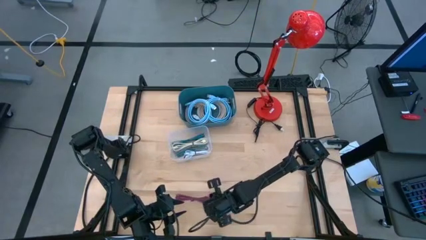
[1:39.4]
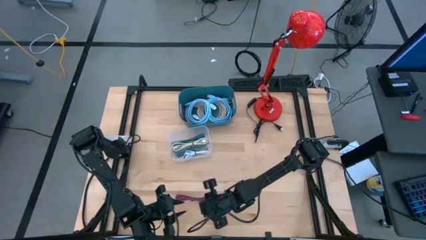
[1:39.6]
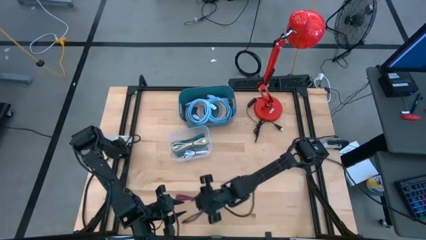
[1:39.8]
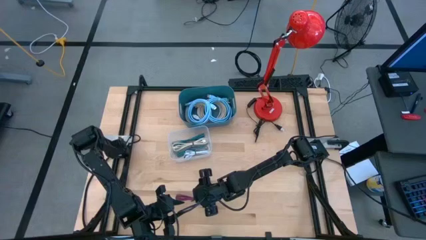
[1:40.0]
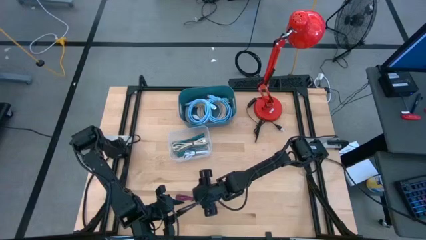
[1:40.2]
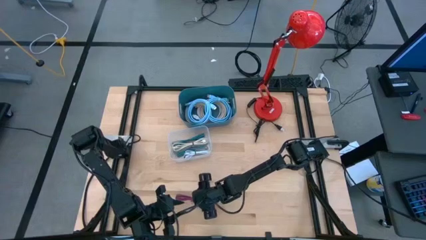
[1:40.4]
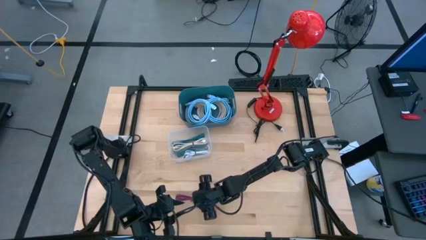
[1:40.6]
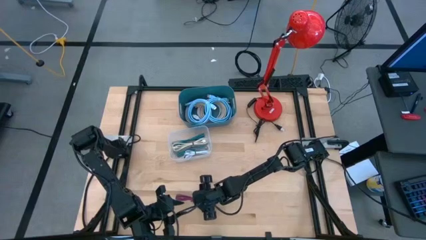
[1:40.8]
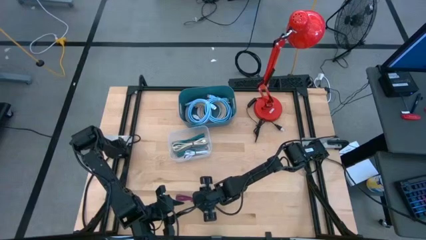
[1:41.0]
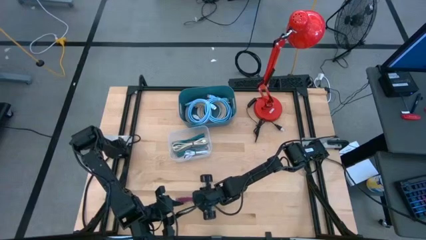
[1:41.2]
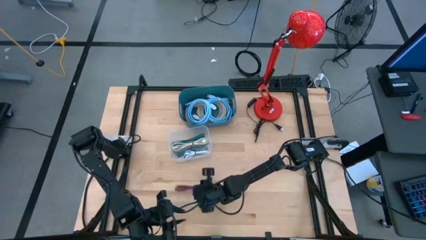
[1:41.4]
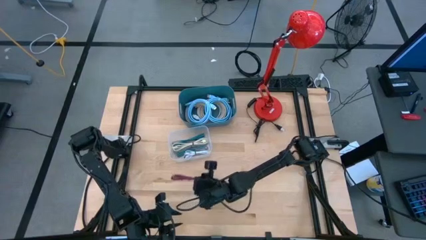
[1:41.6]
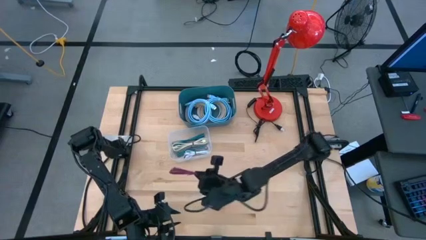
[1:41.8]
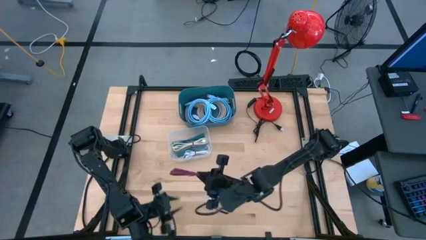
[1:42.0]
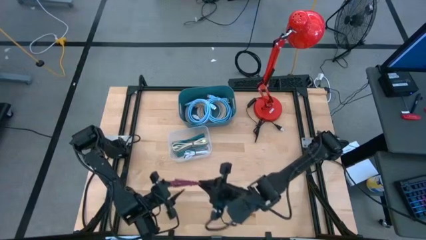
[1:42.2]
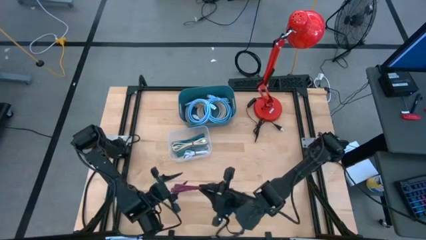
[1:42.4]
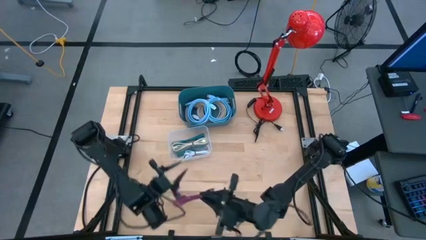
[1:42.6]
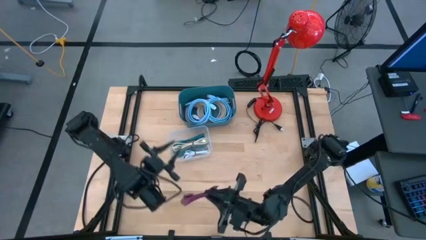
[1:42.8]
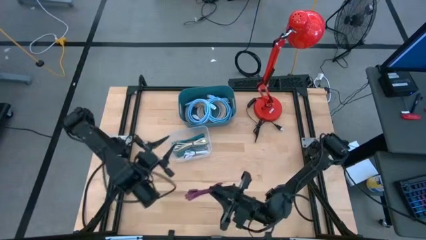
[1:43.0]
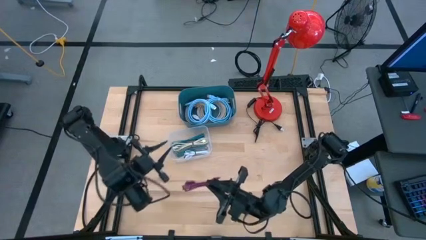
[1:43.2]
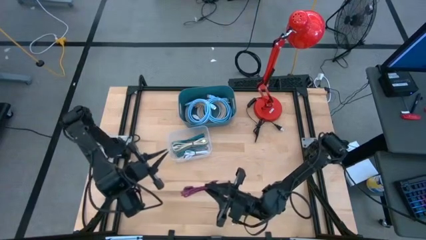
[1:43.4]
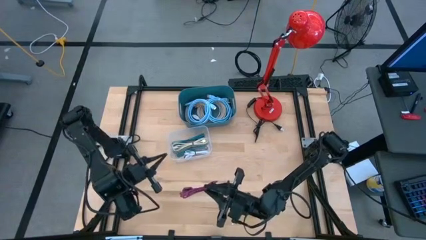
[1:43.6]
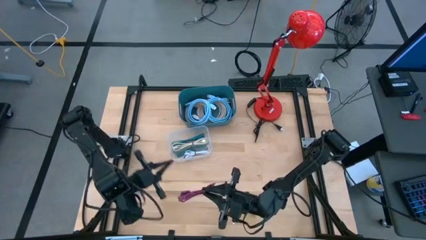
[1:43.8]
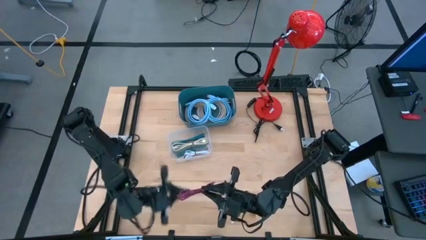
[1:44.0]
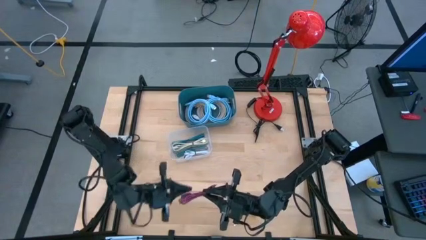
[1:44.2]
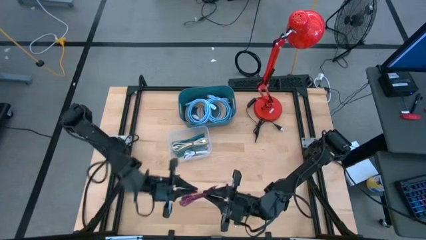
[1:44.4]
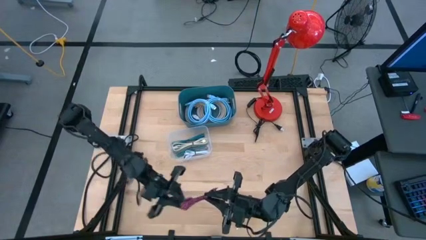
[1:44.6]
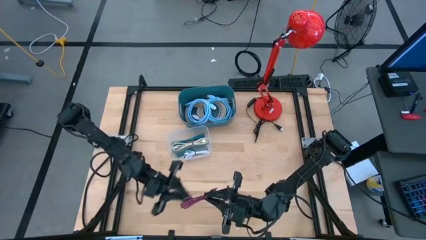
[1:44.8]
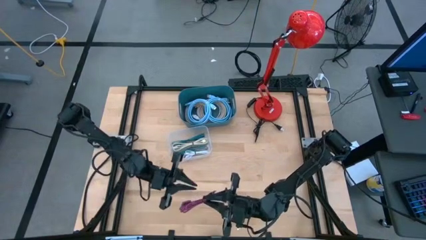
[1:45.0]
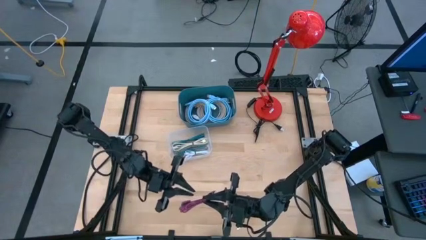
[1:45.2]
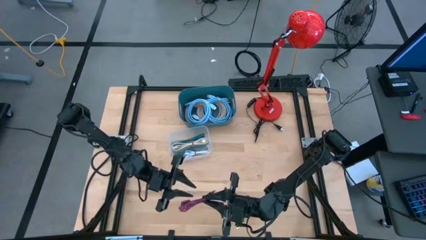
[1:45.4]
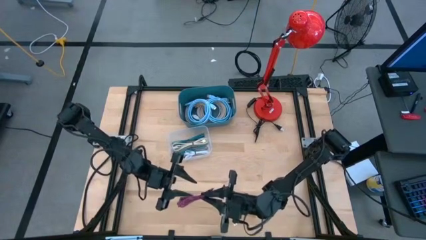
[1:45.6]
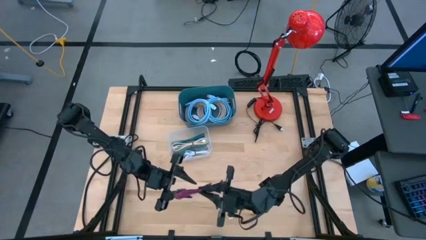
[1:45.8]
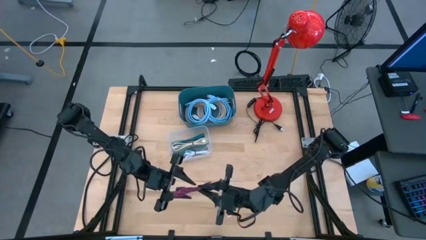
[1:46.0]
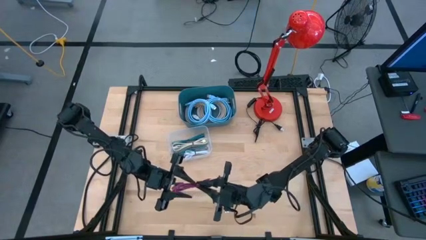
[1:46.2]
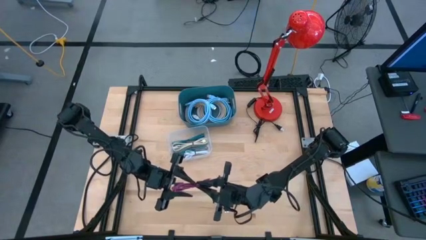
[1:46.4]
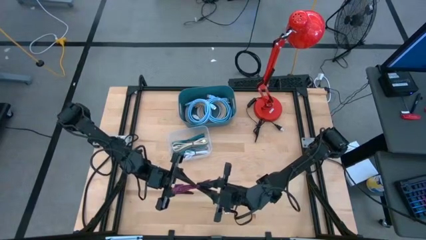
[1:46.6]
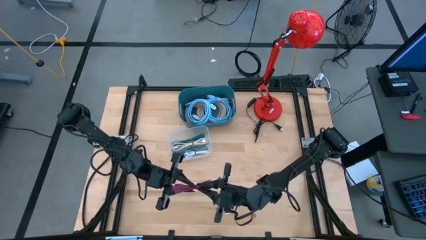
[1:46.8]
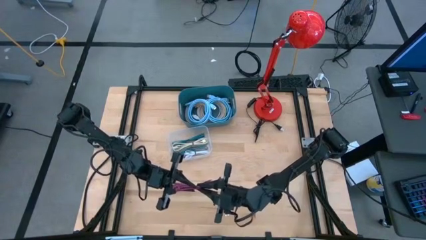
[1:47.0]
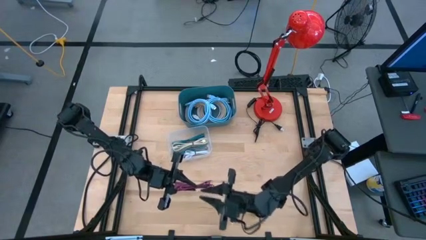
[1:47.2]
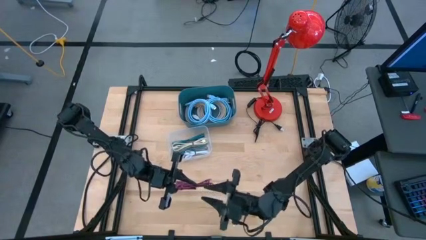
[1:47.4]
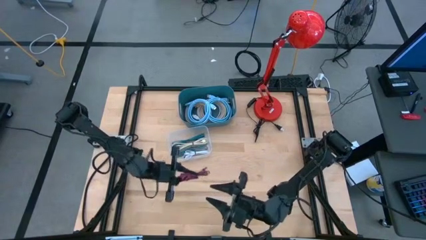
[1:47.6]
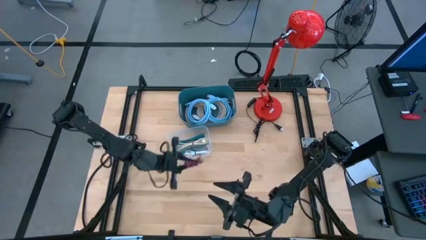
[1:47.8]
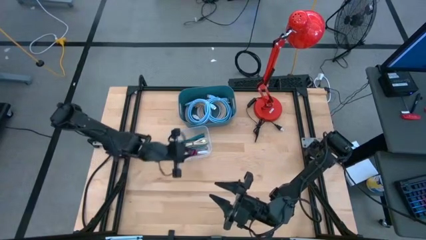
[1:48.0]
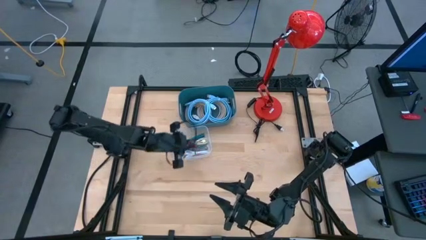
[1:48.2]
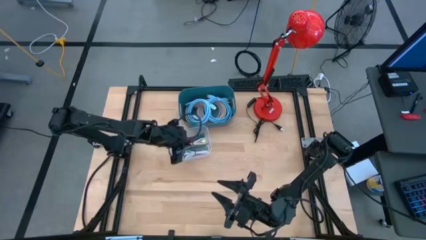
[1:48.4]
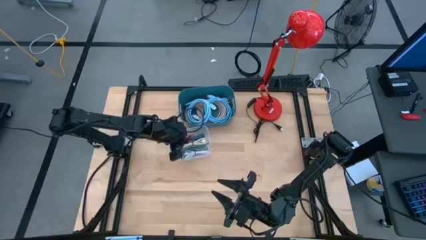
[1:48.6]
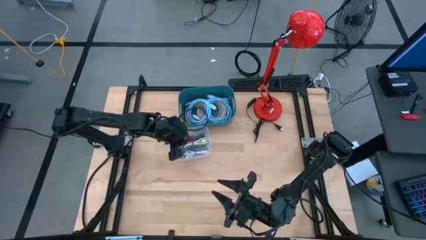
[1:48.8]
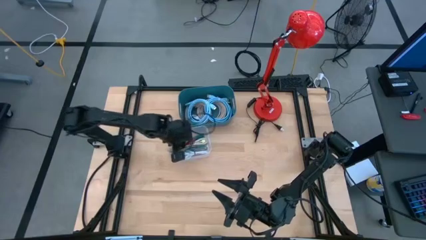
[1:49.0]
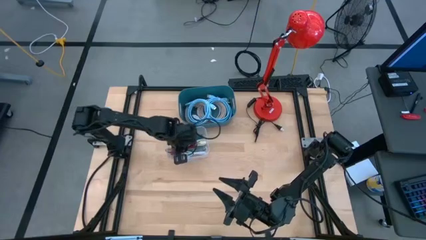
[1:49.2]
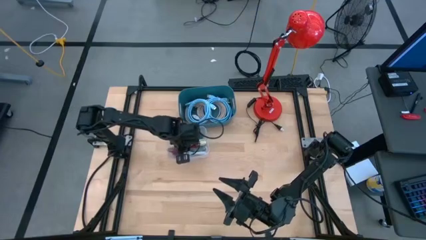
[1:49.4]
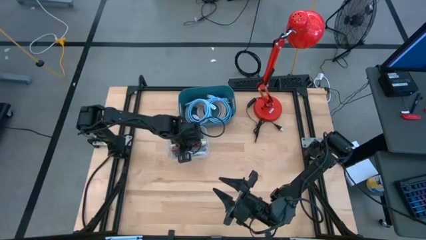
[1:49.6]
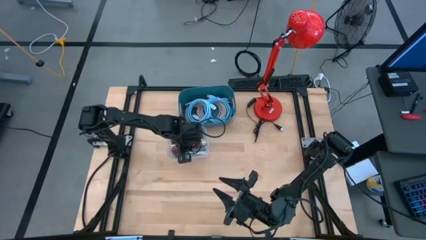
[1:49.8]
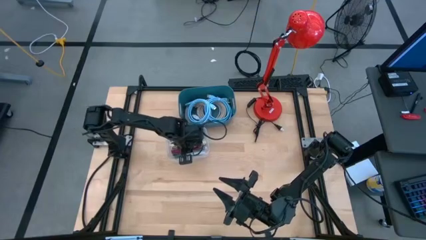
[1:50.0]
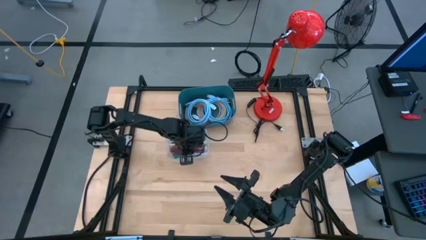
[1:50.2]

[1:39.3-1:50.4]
Task: Pick & Place USB Port
Put the pink charger cable into the transparent bin

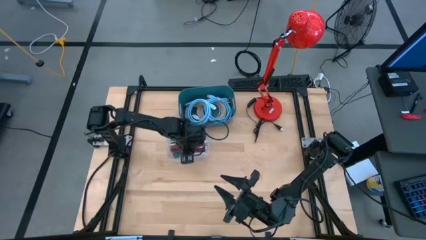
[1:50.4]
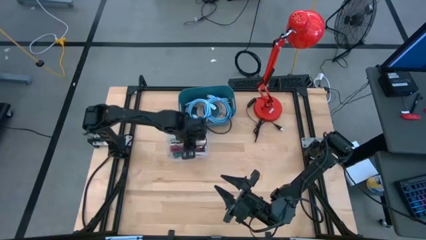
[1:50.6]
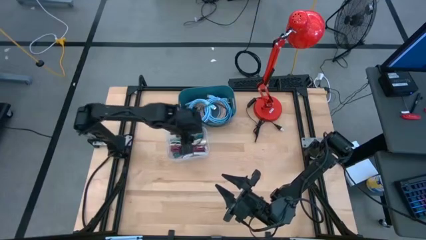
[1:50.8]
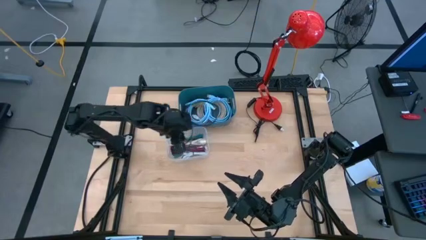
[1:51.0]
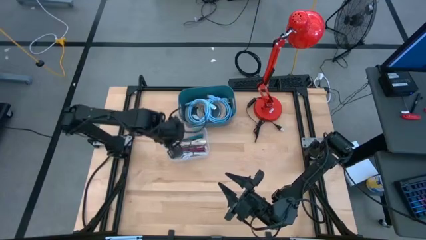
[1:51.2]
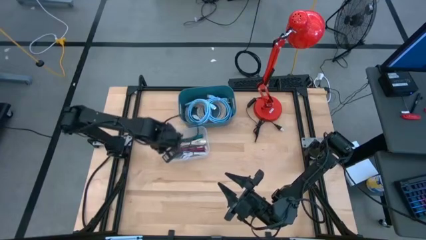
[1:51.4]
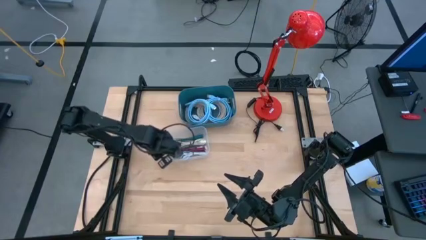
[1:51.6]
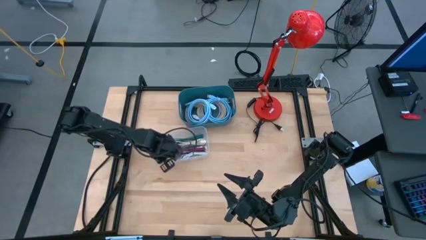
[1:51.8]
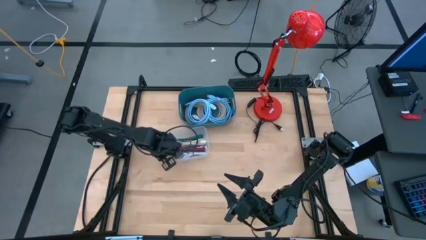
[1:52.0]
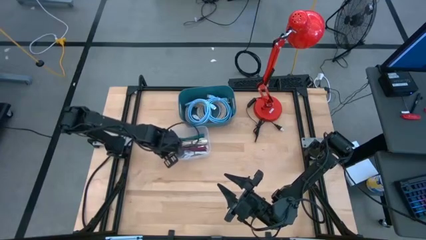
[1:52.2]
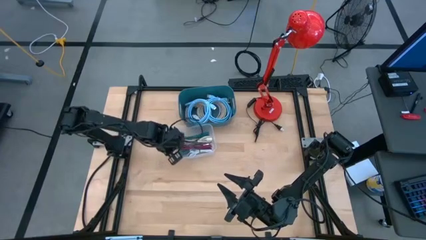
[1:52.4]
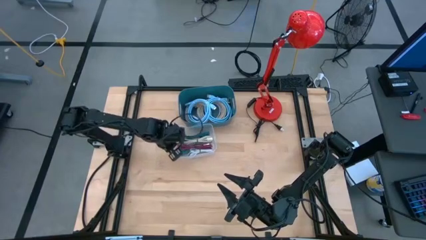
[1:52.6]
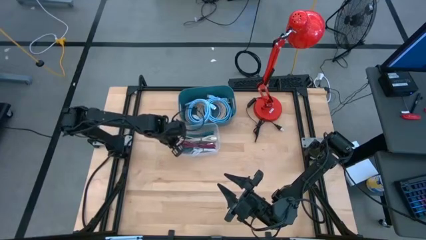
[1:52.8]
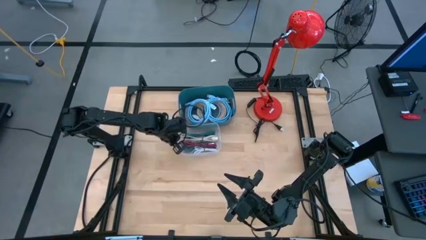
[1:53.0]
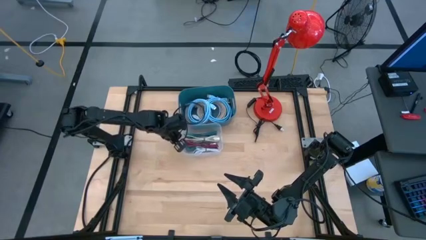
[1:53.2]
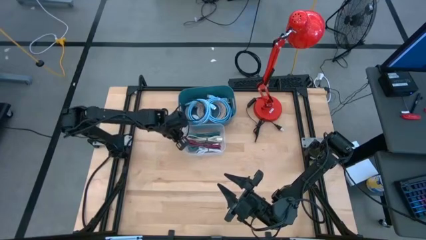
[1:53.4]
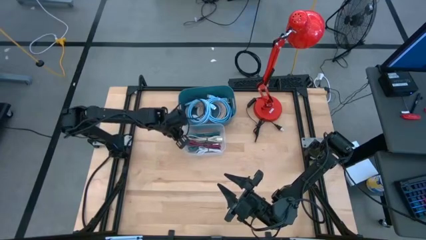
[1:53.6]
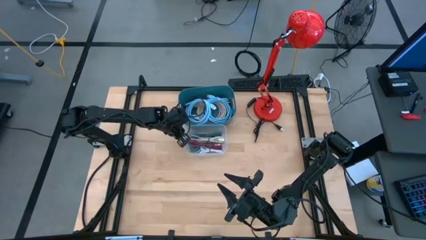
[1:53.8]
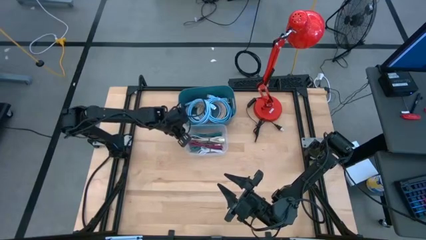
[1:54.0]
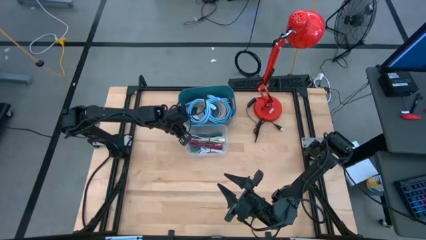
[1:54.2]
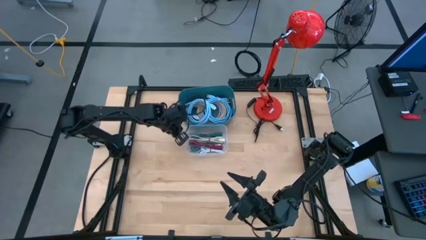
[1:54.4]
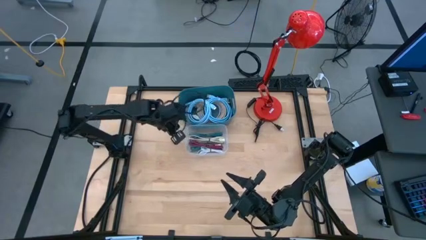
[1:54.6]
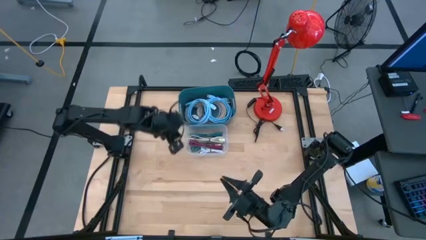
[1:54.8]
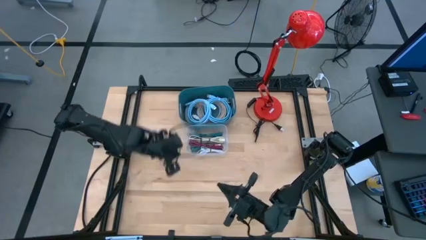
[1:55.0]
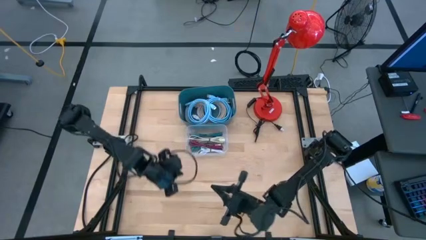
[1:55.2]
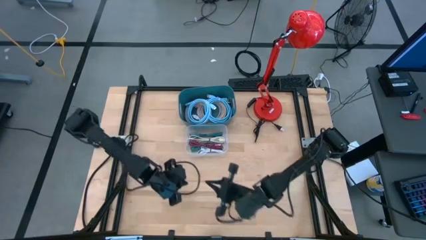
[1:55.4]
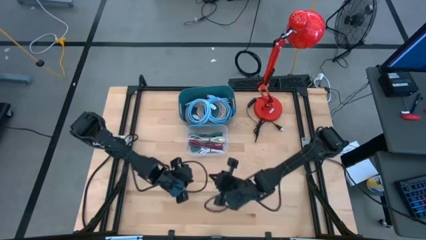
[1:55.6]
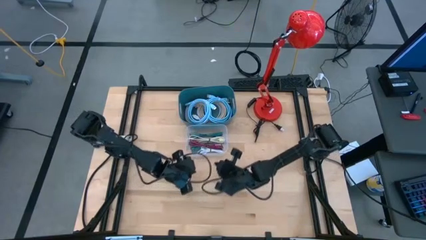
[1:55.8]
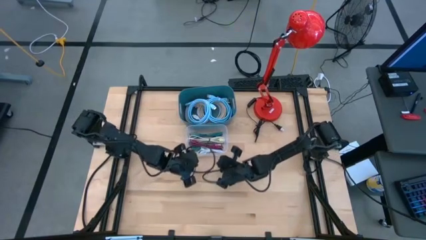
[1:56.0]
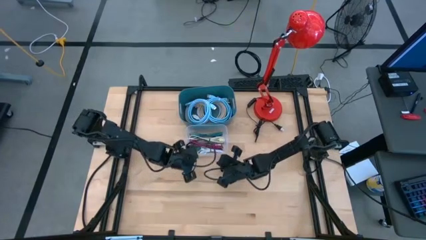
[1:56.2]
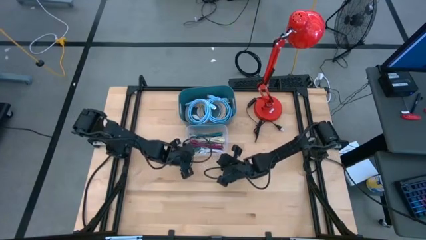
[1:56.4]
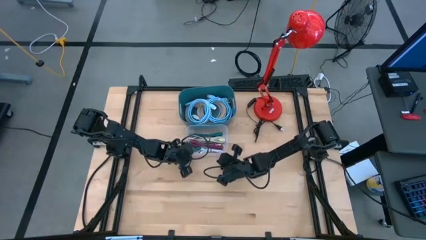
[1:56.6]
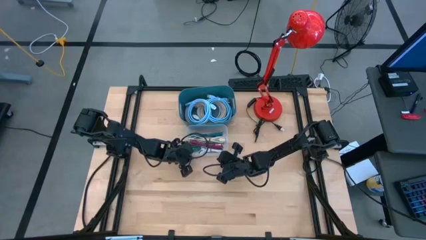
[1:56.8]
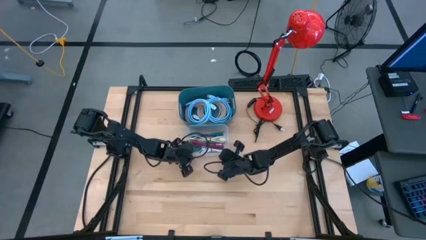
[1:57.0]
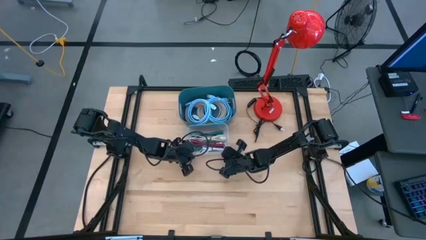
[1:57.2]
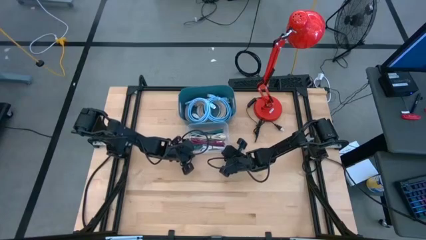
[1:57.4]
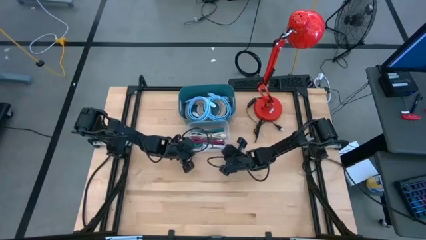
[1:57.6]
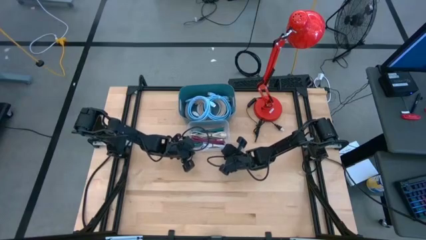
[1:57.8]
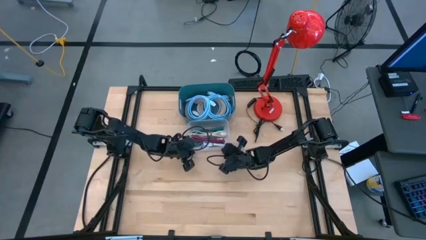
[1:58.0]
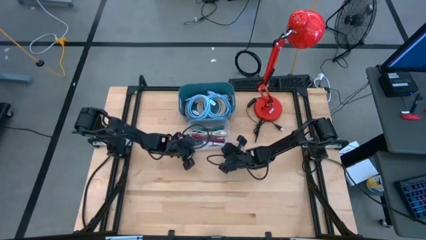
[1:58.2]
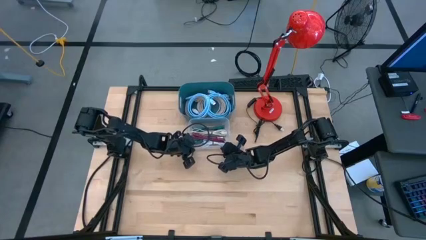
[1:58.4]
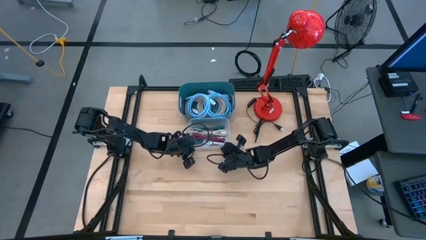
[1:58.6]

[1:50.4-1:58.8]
Adjust the bins
